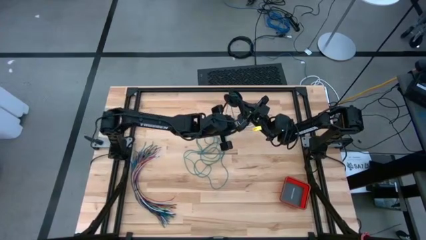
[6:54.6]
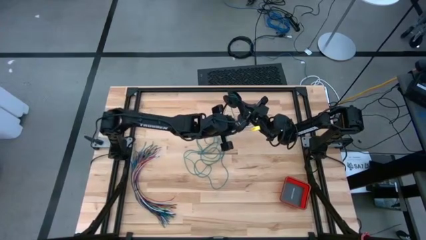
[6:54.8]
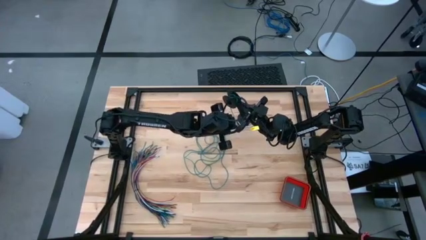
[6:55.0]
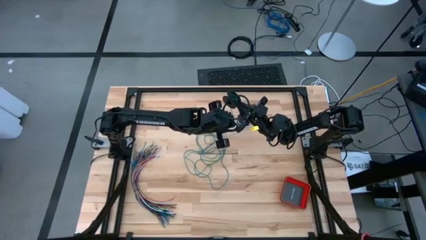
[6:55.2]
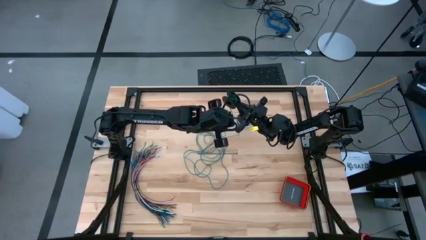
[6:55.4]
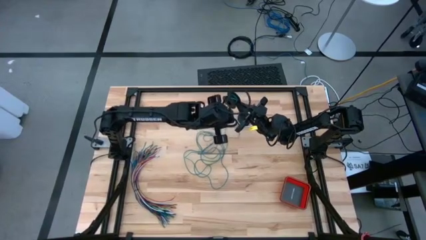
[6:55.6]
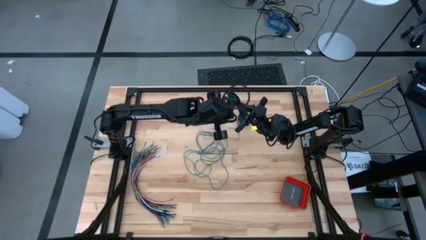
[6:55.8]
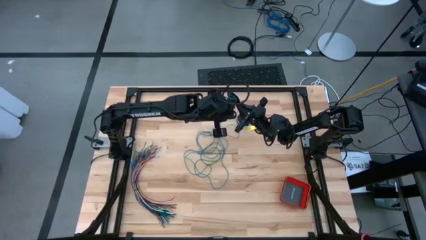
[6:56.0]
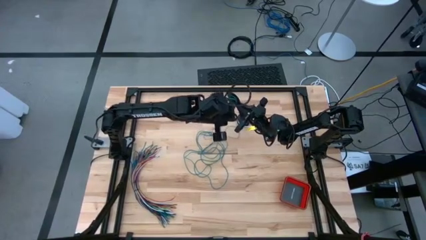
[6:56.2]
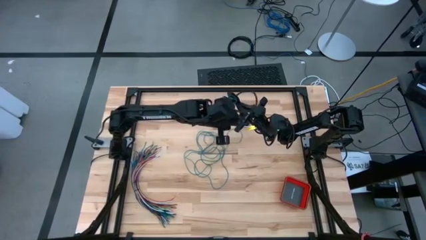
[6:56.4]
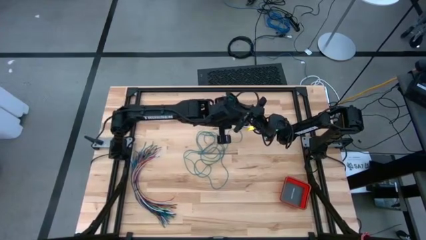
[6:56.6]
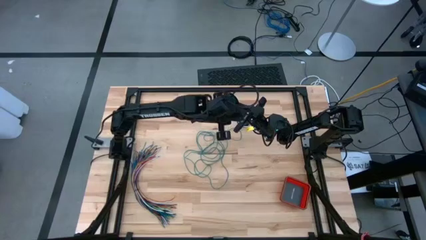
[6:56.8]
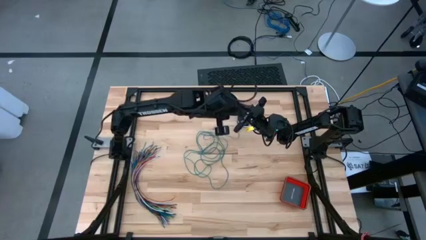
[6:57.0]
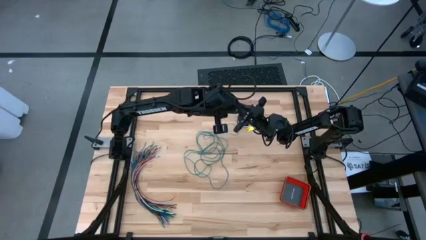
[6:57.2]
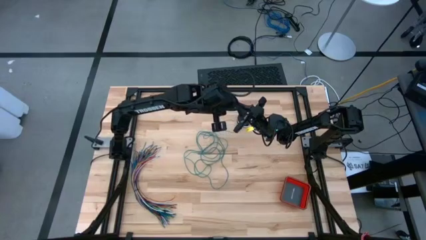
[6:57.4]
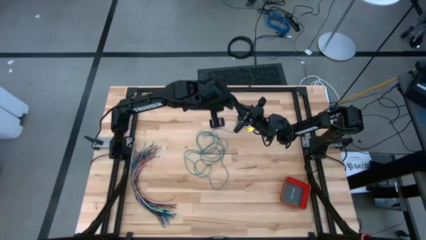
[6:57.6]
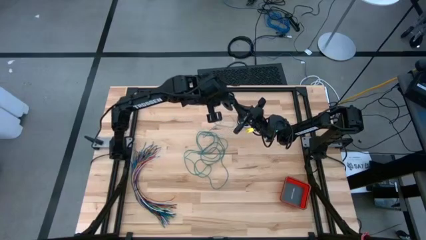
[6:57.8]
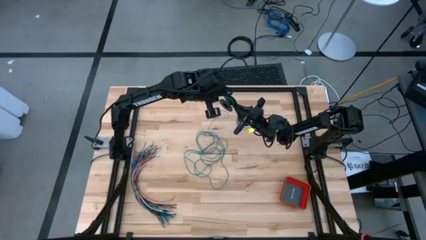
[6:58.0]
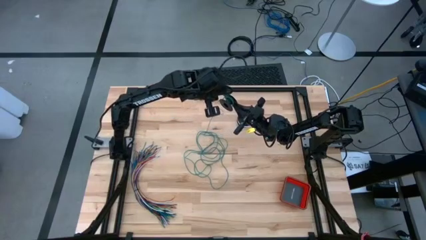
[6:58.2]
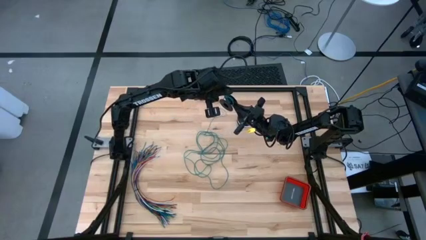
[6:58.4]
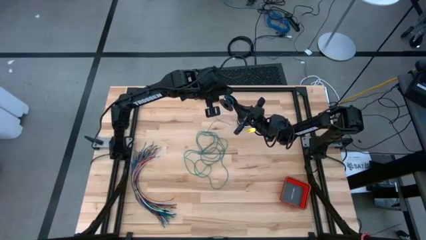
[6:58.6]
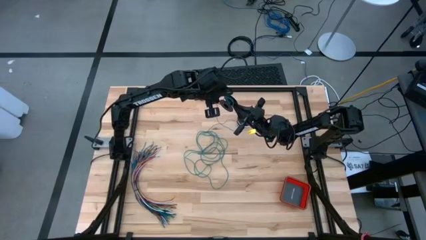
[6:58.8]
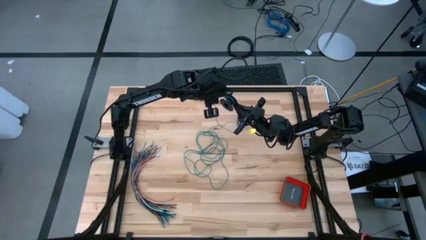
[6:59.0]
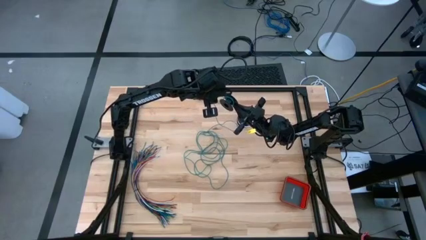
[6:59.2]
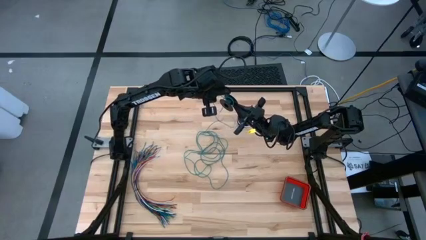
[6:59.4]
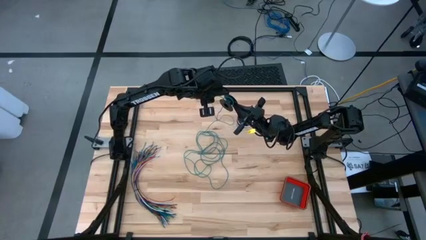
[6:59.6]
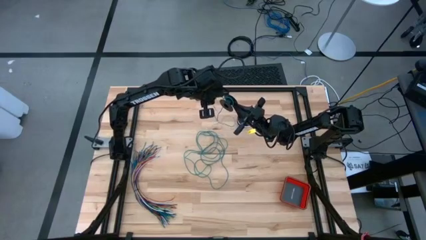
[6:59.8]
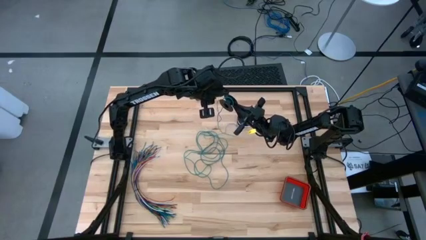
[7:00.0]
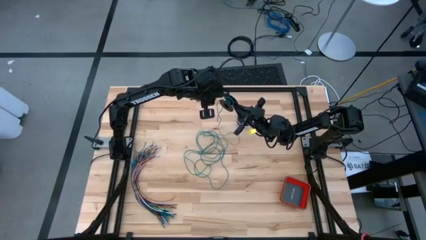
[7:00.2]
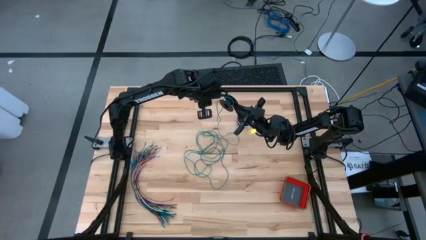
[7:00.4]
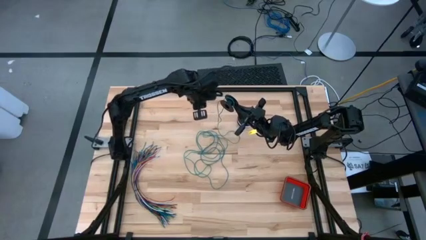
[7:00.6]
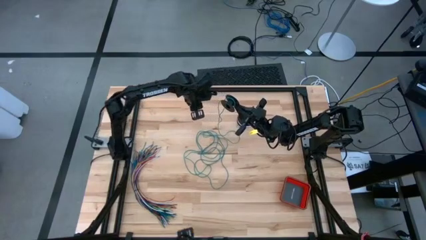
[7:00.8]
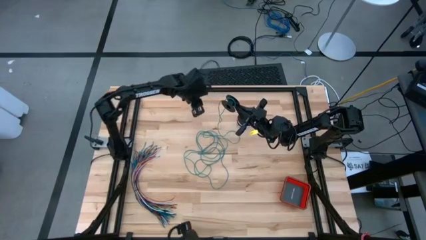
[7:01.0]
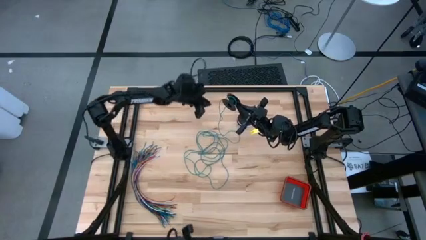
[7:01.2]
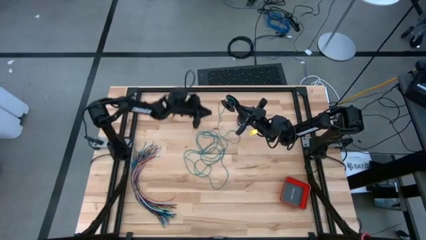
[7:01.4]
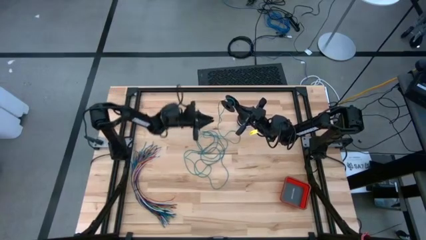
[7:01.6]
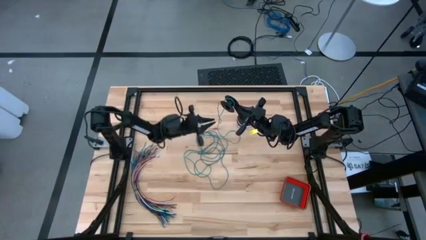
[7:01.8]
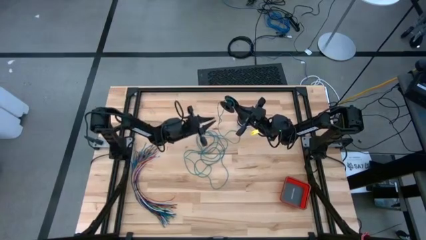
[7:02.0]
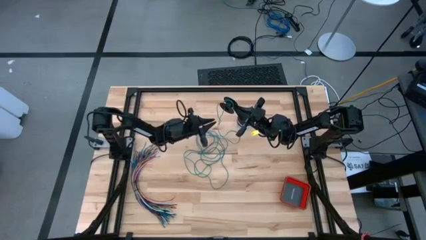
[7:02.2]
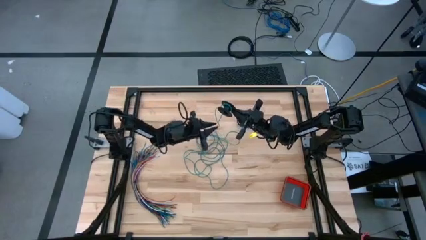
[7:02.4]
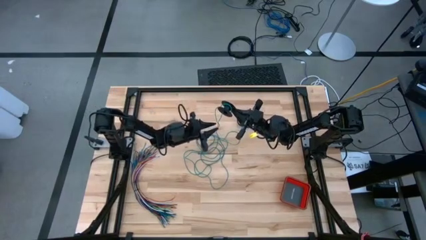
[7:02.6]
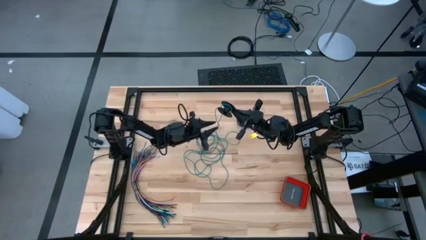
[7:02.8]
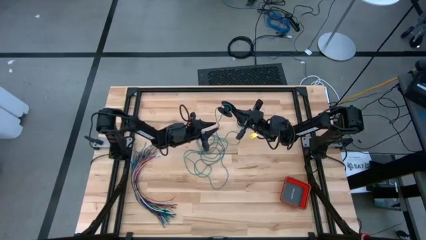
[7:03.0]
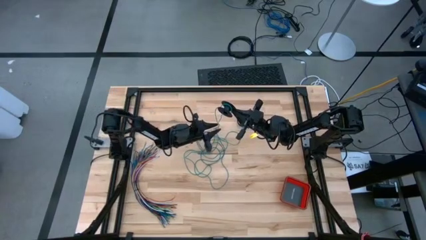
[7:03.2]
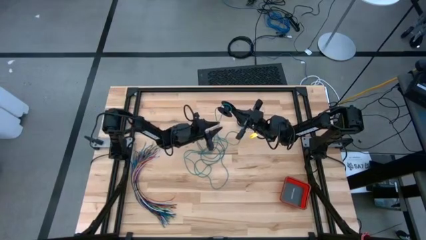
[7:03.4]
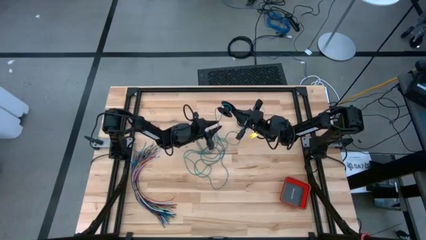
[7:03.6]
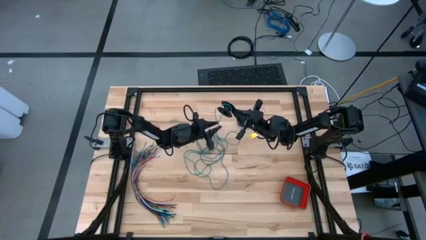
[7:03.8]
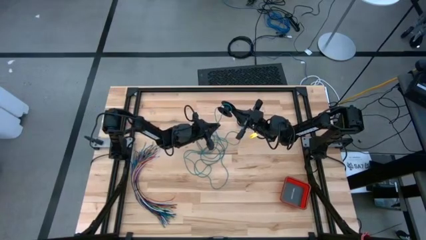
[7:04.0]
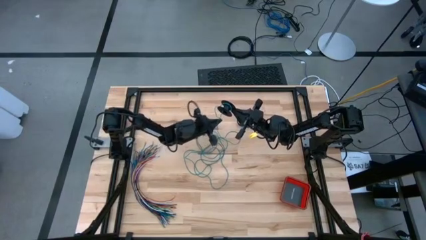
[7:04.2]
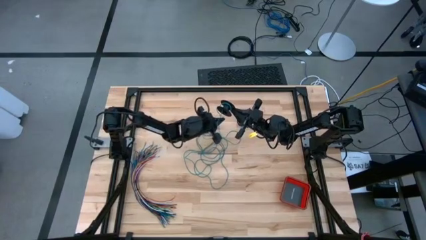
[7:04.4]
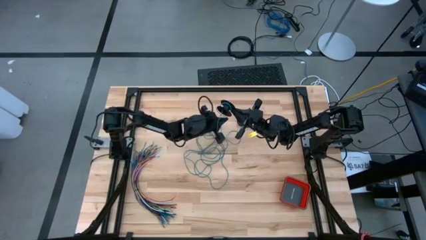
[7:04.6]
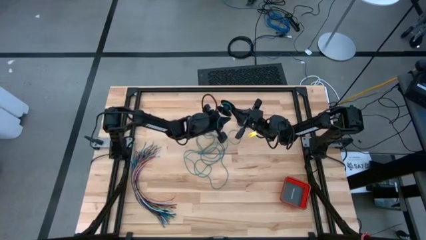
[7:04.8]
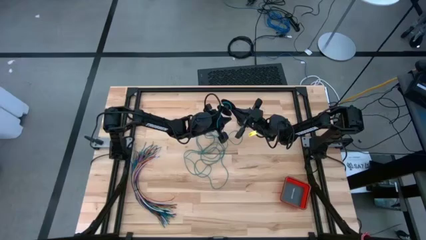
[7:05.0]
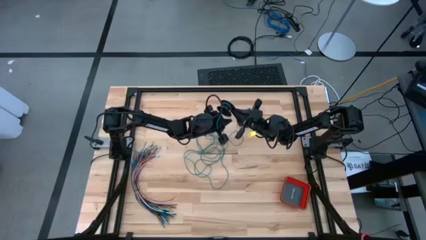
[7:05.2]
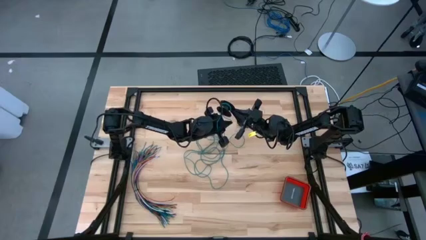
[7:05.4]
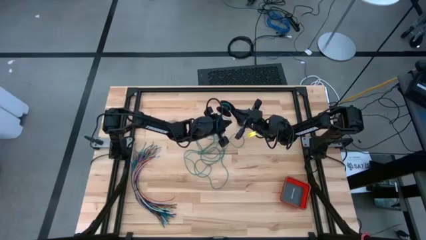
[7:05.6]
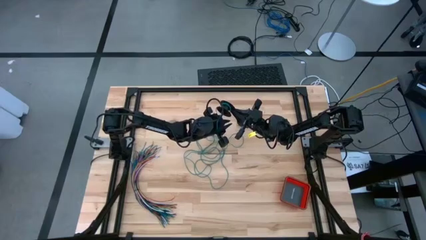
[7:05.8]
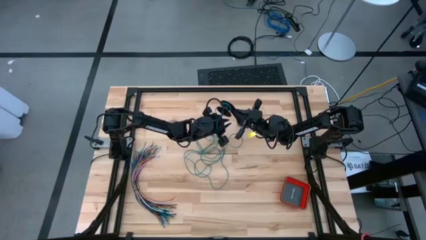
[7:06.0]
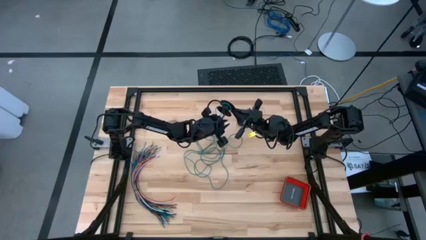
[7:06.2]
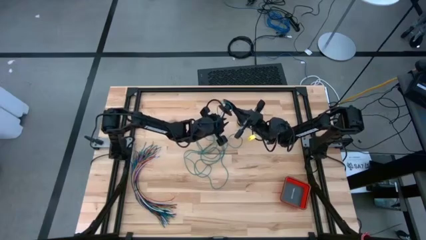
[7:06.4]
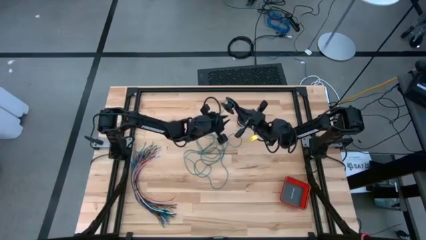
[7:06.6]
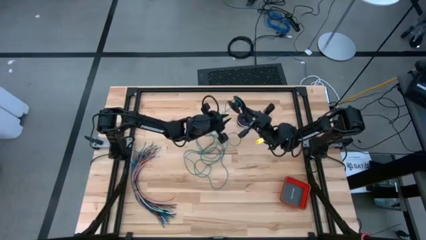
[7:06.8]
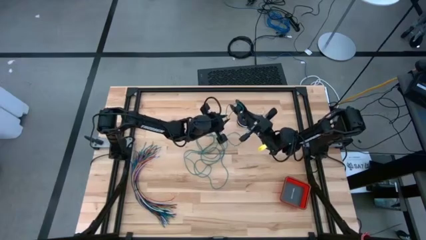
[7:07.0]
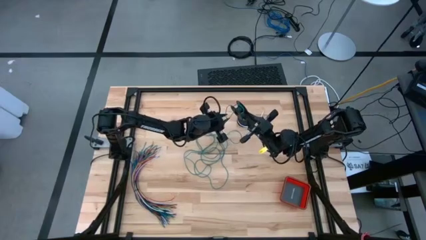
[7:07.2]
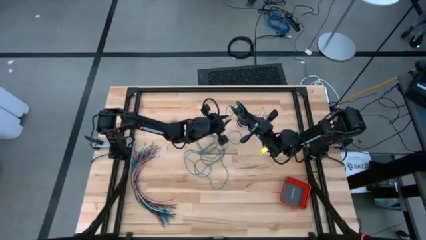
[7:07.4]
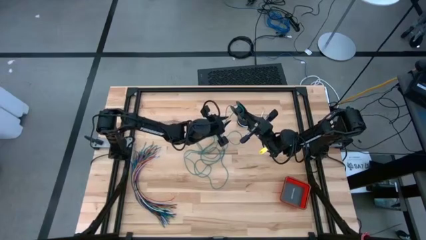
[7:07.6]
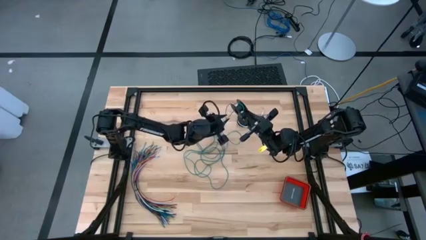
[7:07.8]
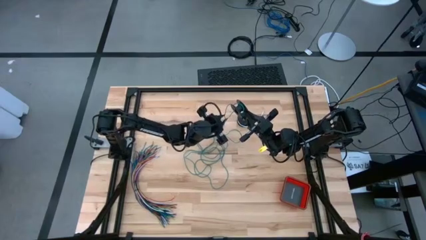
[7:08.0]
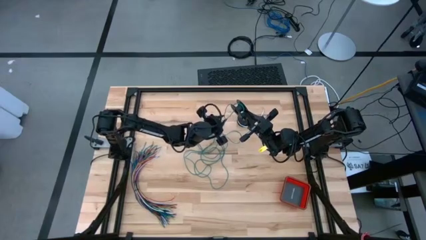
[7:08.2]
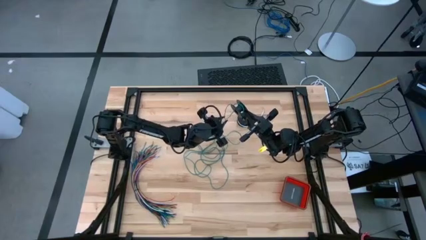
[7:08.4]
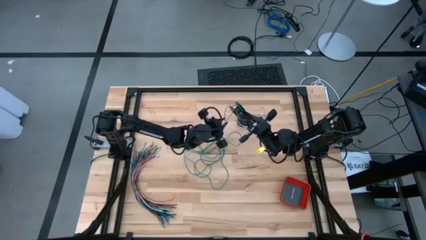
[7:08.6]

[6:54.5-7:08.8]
Task: Coil cords
Coil the green wire onto the spool

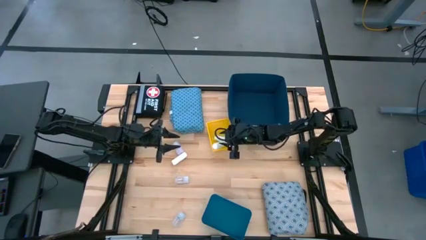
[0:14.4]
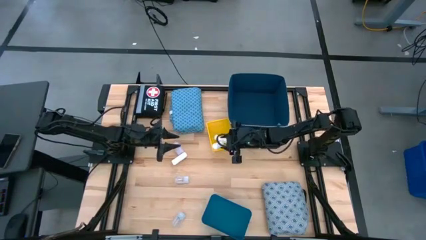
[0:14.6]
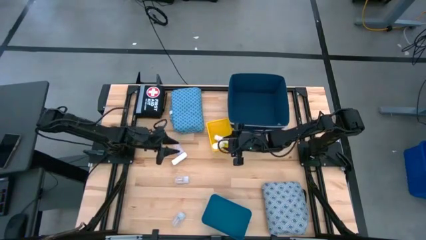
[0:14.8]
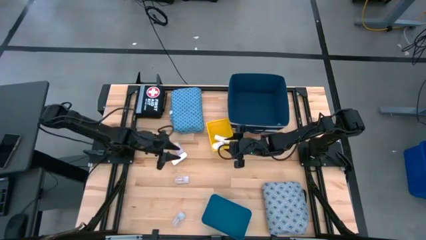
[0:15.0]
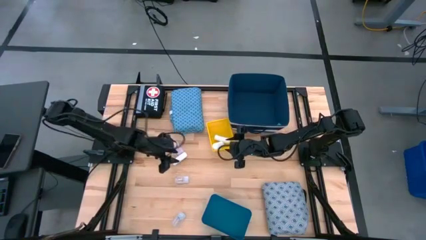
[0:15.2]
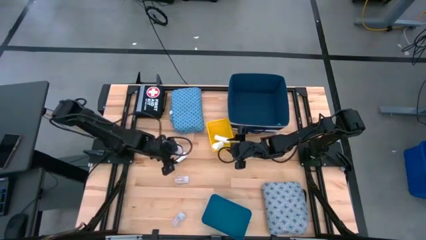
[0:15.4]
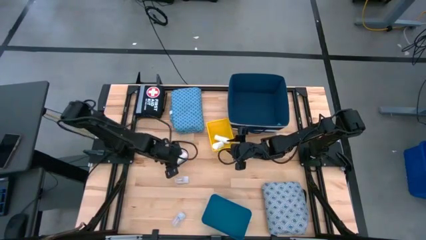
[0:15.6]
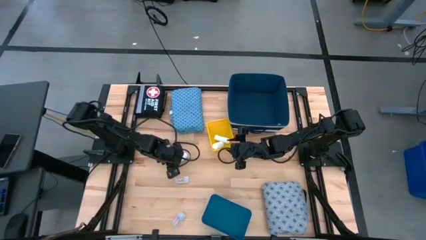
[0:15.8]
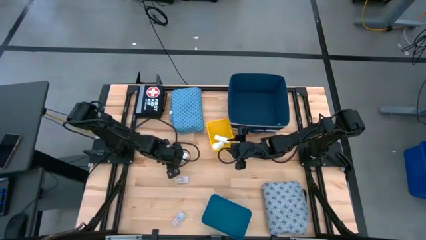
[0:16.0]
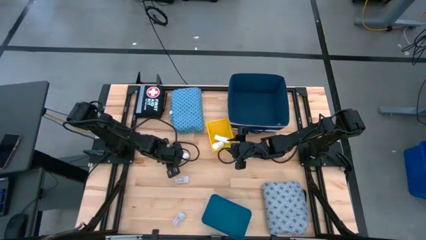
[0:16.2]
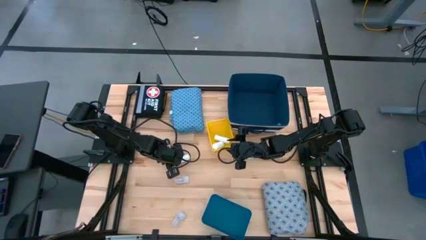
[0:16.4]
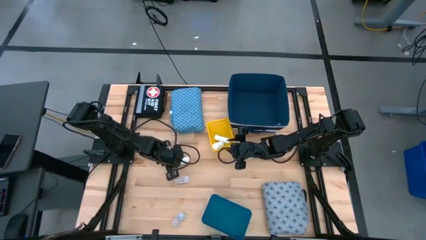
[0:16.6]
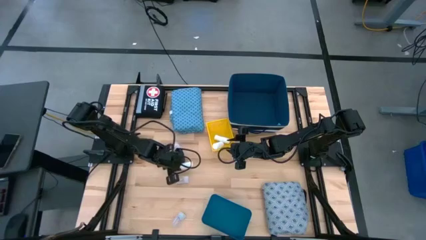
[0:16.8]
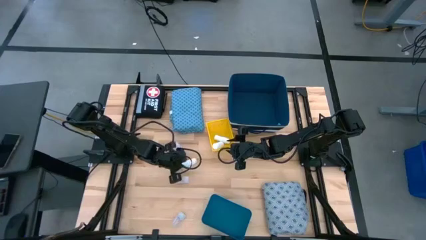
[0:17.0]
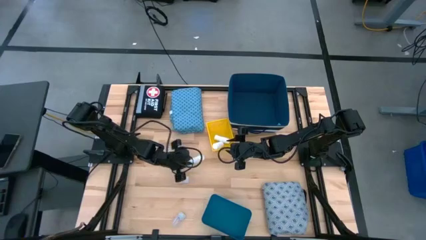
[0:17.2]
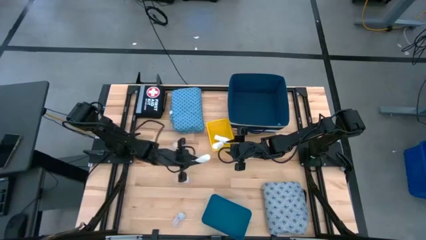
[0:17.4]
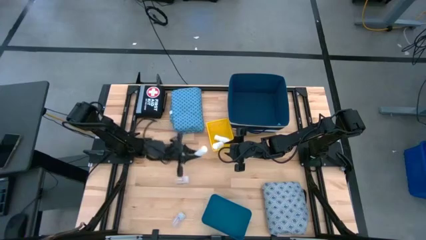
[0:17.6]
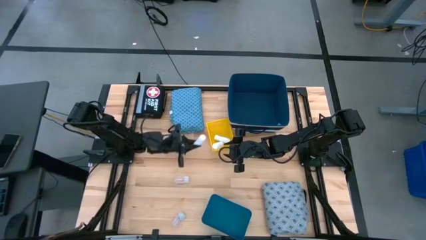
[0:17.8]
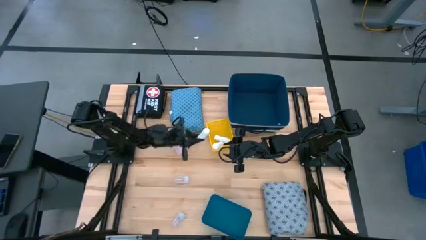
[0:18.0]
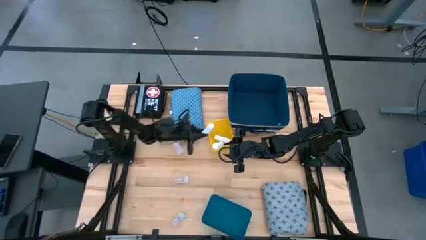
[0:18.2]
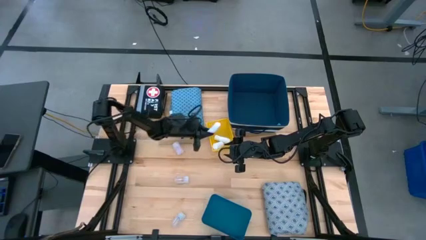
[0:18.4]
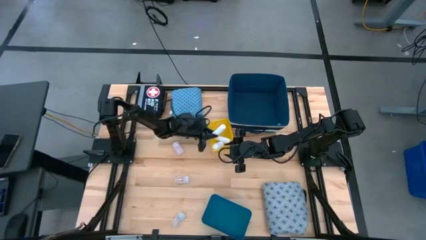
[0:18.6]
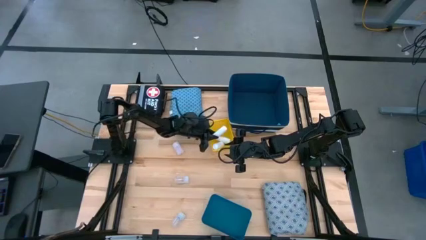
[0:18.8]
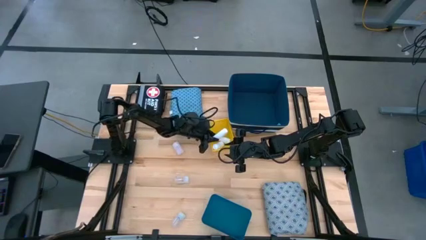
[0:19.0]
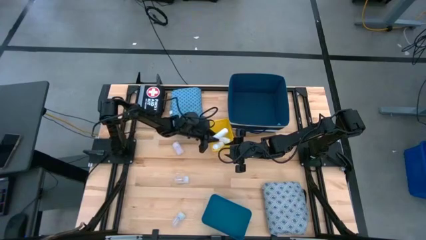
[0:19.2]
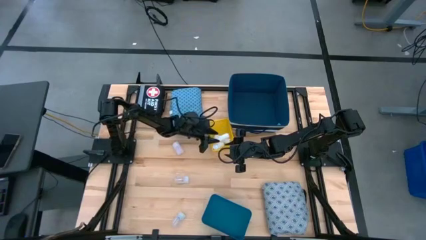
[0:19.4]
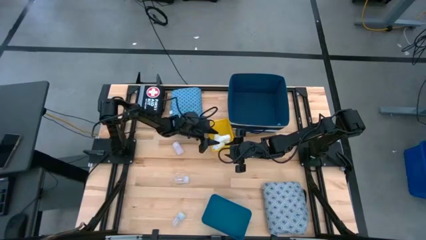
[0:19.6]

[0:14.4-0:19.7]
Task: Pick & place medical supplies in basket/bin
Put the white bandage into the yellow basket
